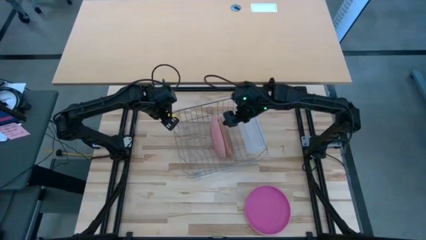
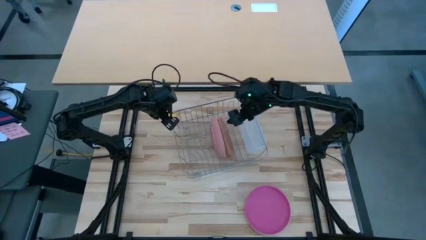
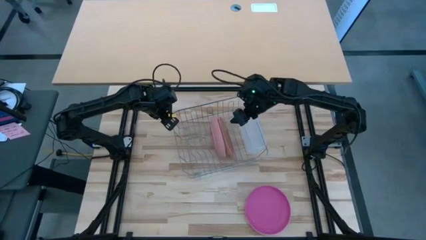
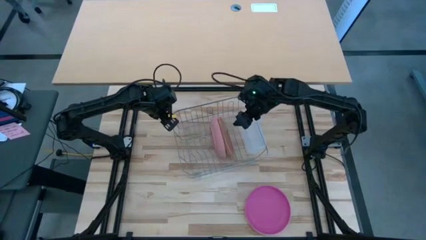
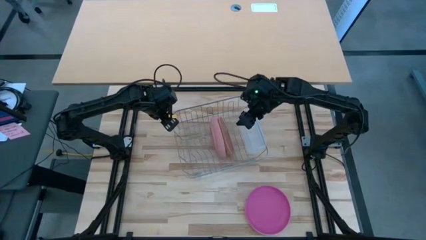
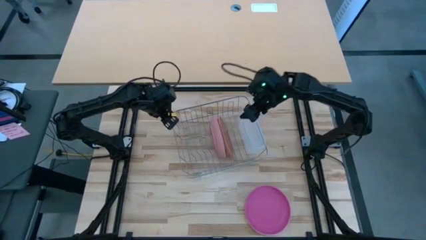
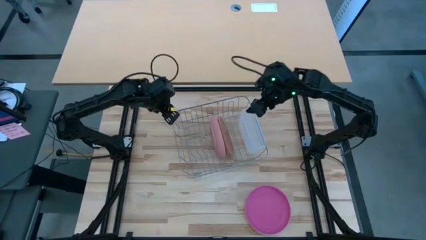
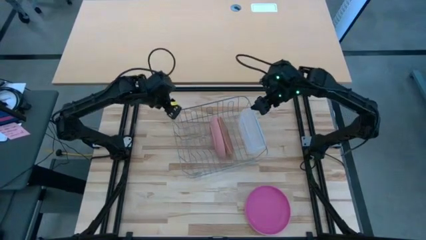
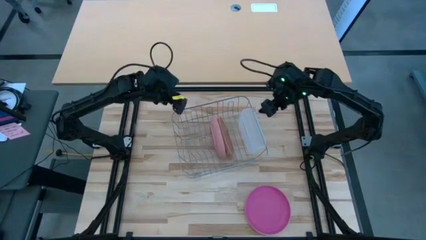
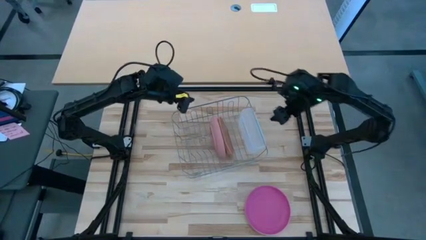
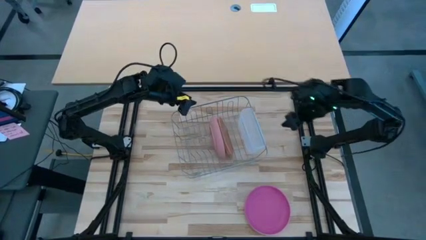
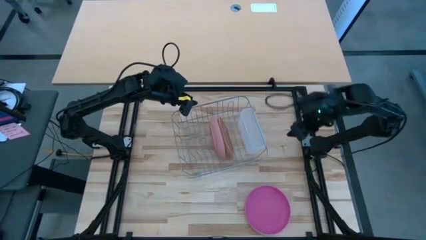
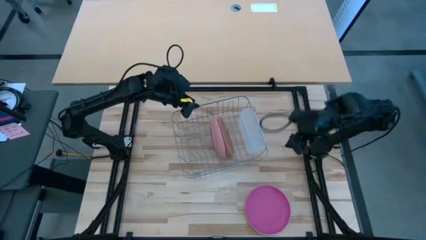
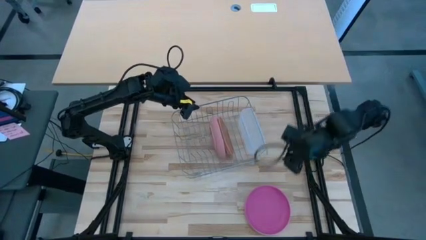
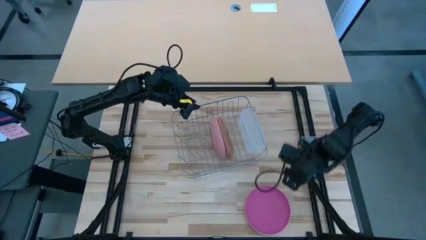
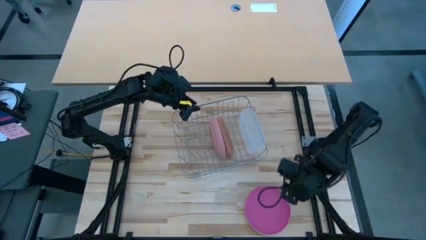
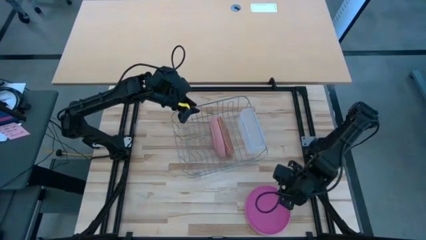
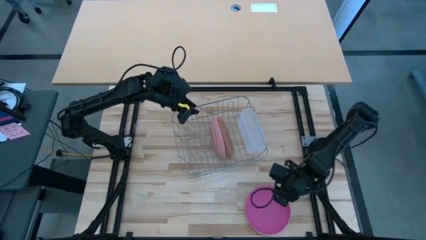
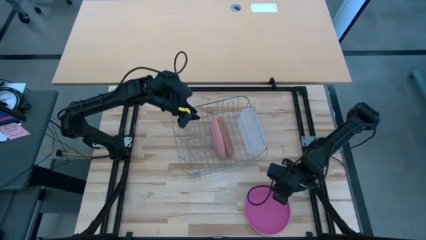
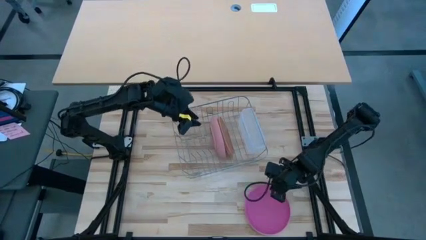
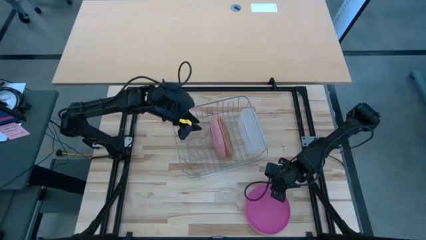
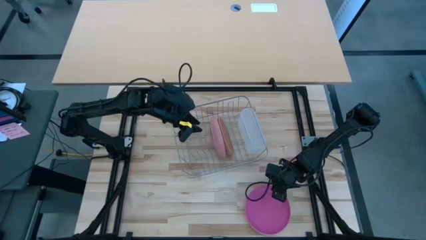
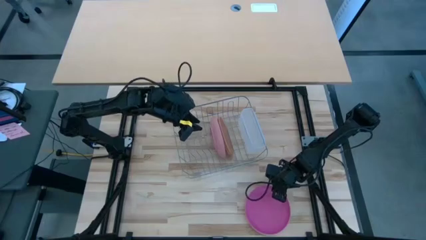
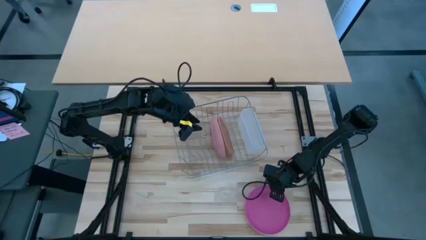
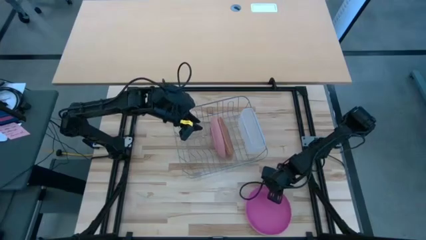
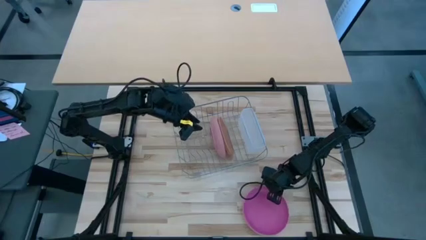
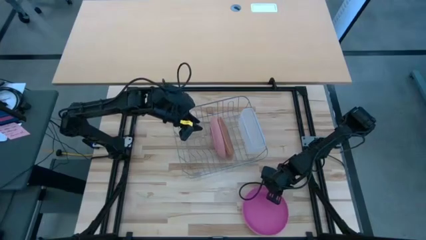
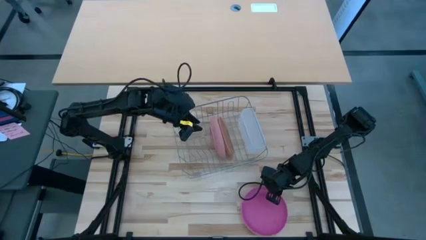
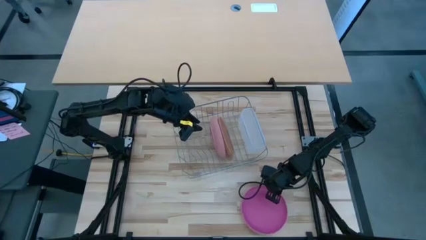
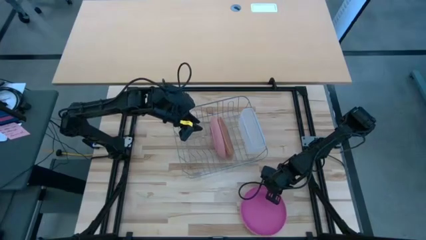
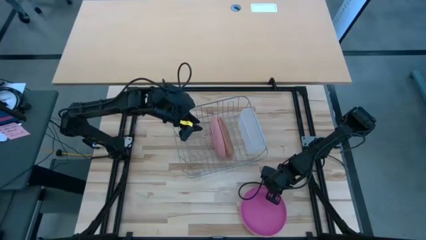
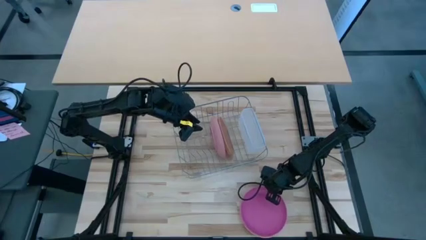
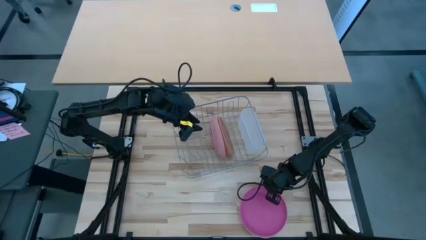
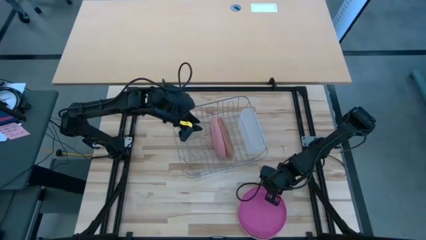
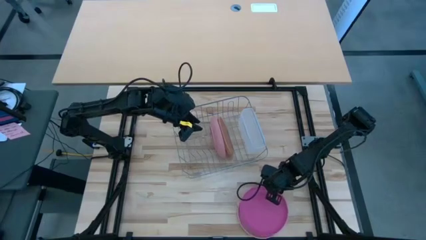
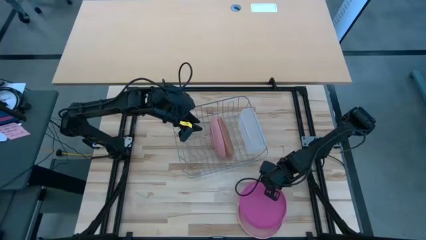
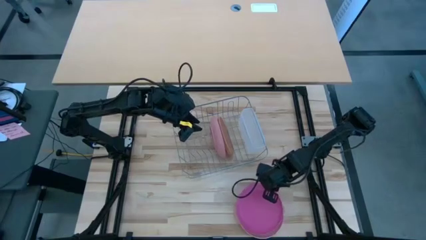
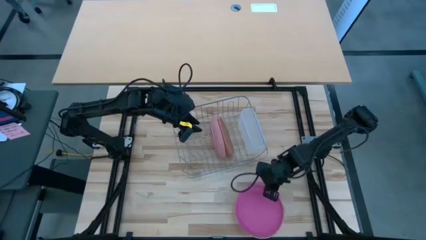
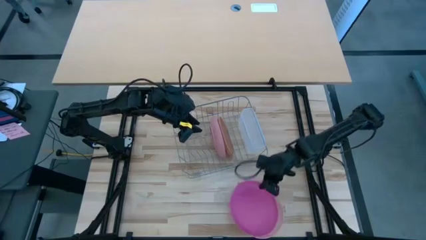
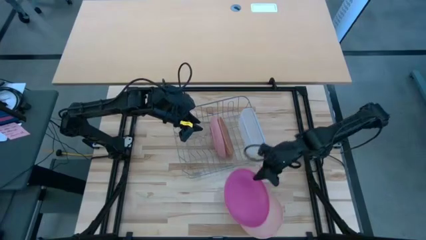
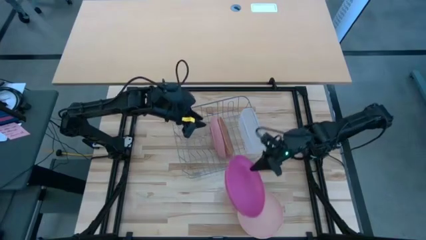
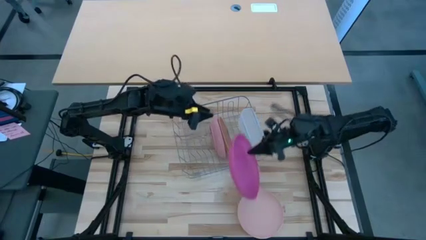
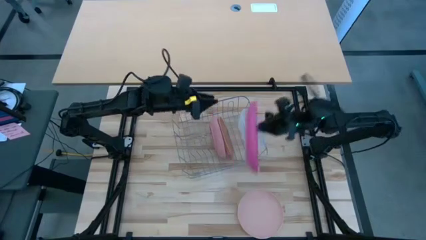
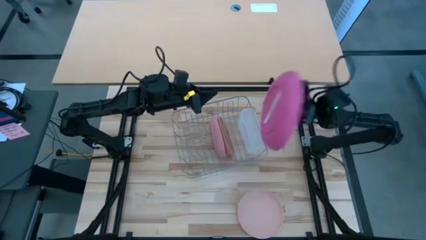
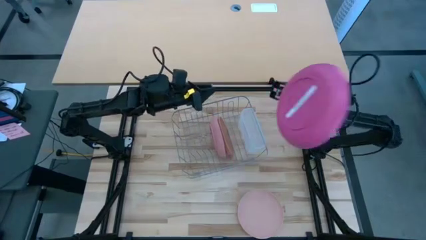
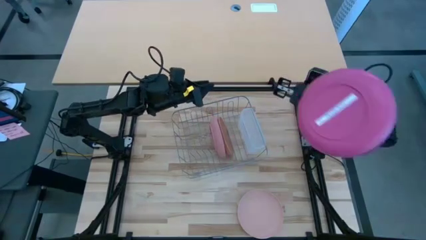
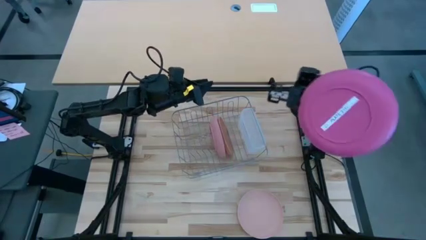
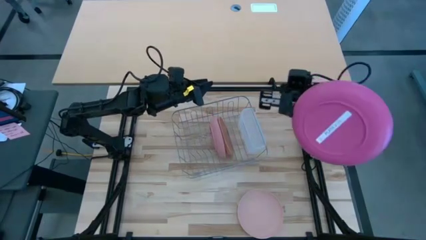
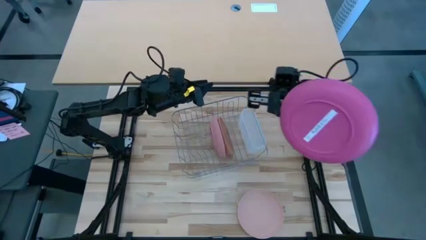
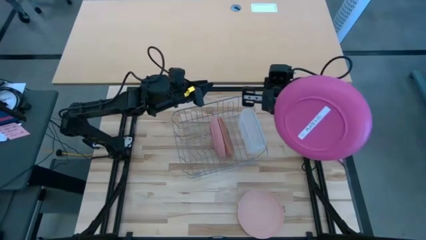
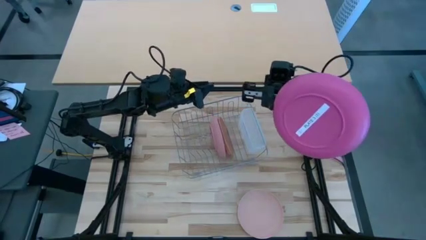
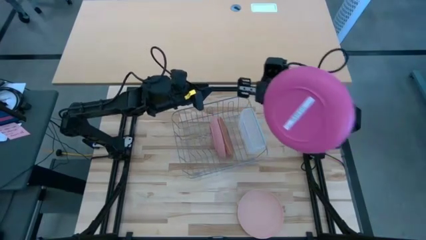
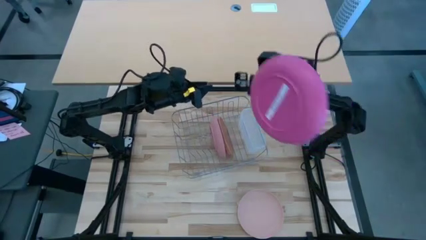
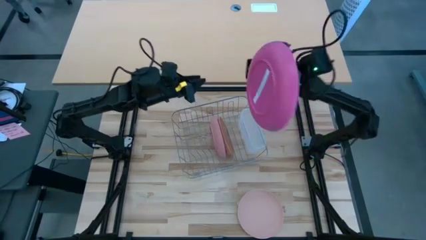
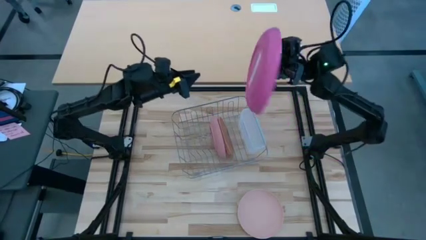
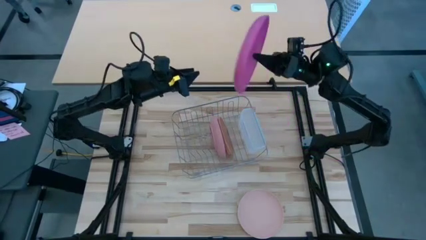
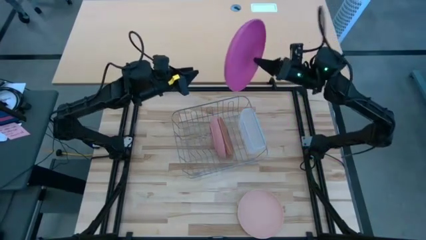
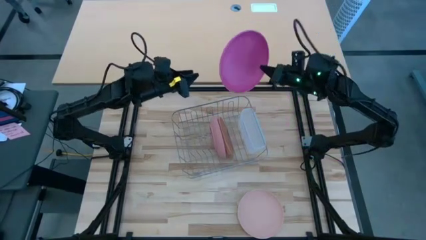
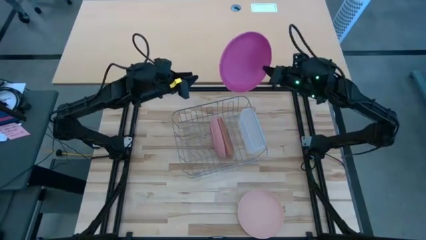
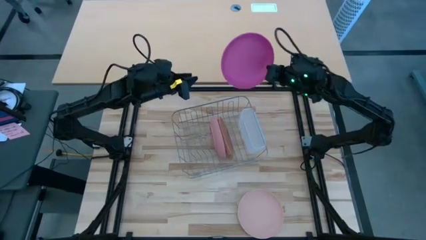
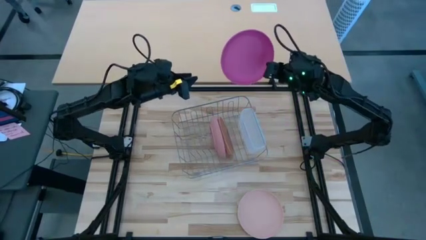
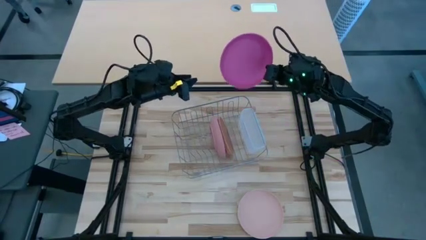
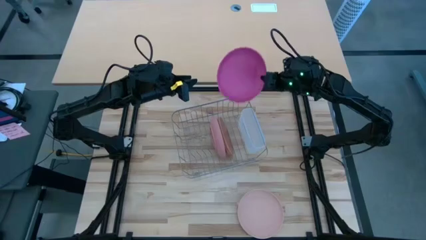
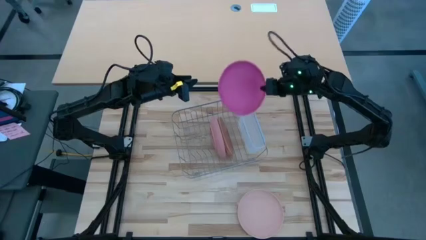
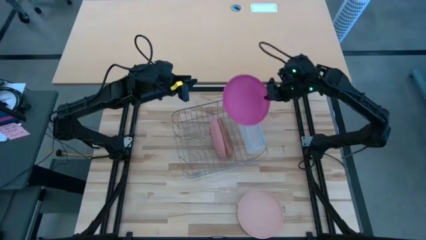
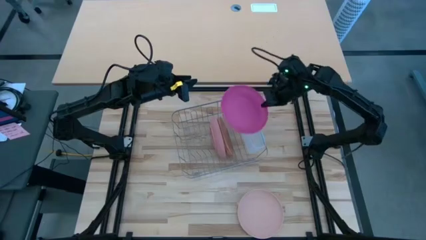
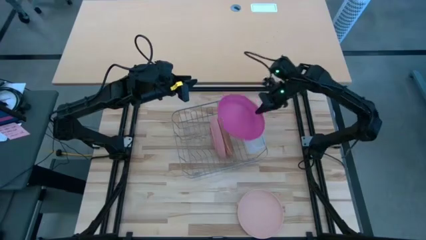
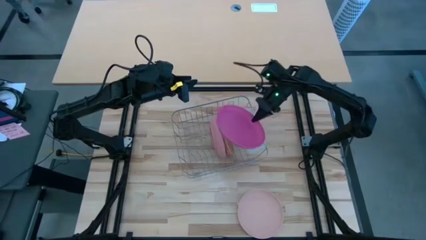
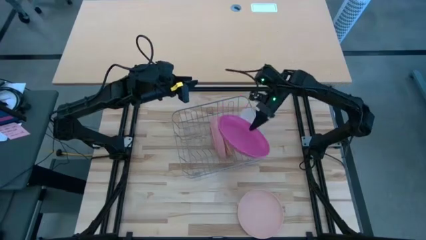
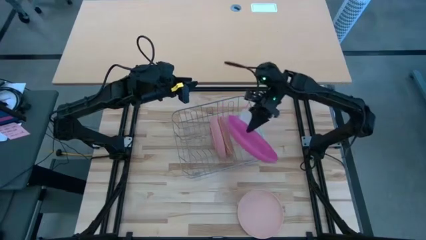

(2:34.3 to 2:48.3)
Task: Sort dishes
Put the pink plate in the dish rack
